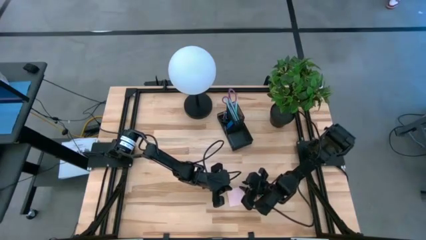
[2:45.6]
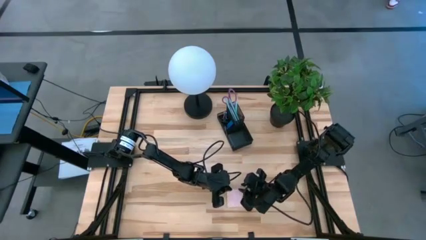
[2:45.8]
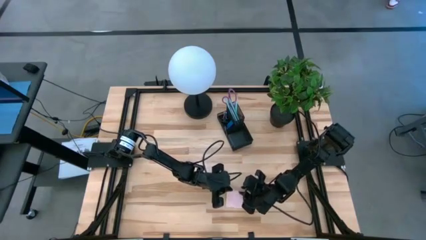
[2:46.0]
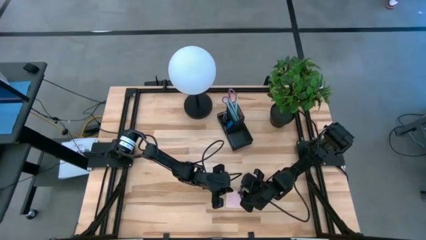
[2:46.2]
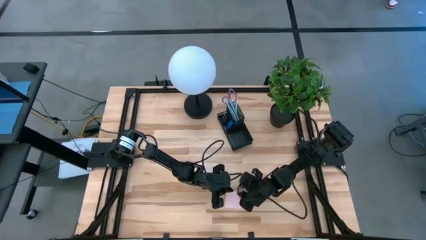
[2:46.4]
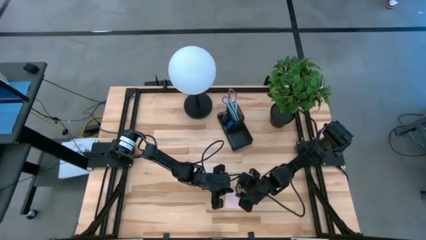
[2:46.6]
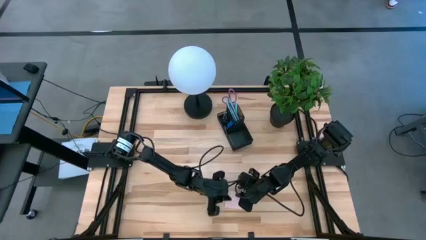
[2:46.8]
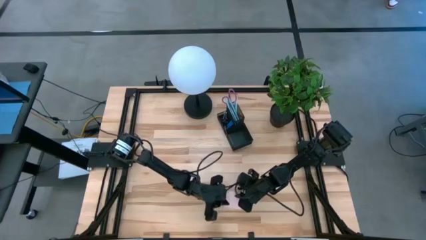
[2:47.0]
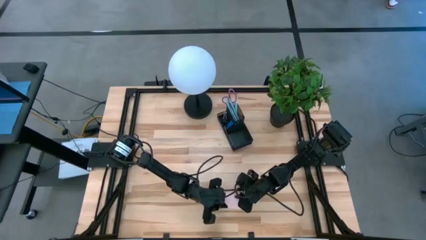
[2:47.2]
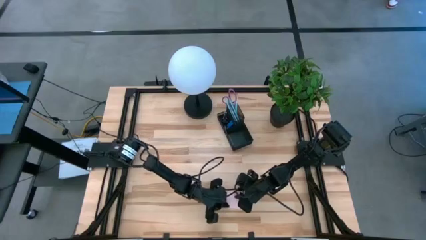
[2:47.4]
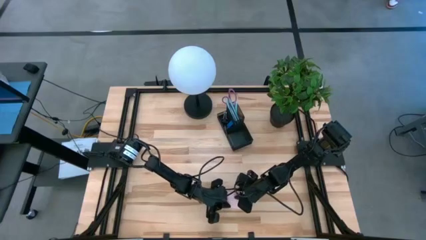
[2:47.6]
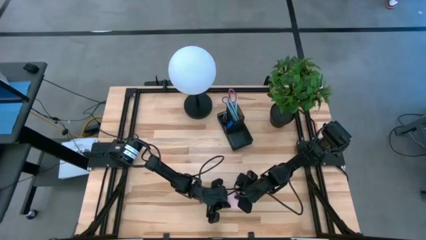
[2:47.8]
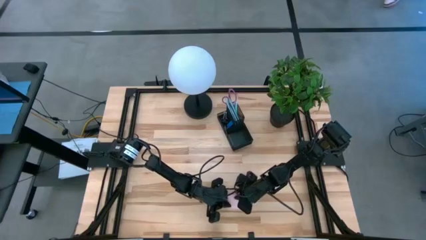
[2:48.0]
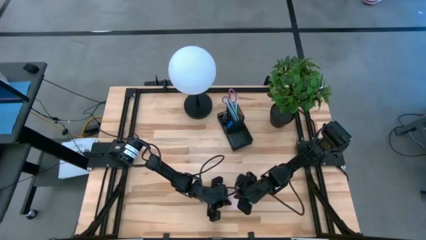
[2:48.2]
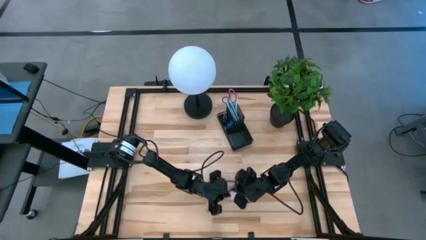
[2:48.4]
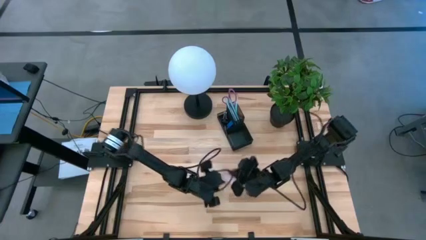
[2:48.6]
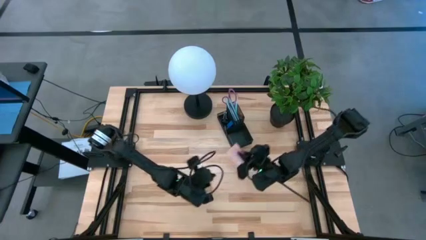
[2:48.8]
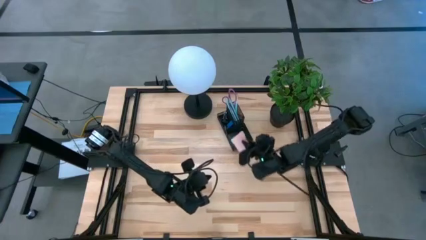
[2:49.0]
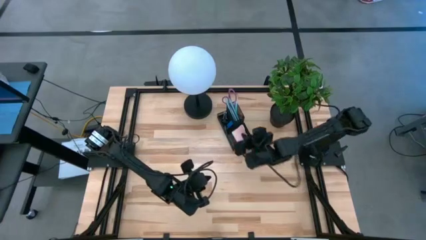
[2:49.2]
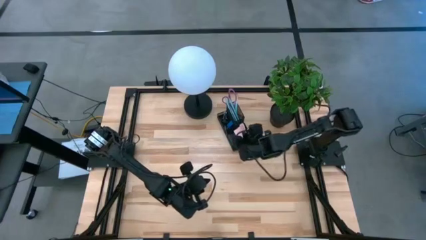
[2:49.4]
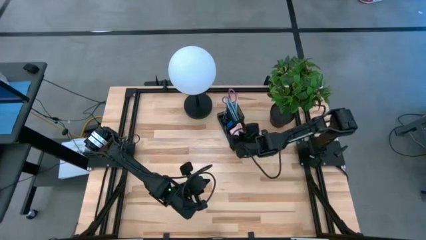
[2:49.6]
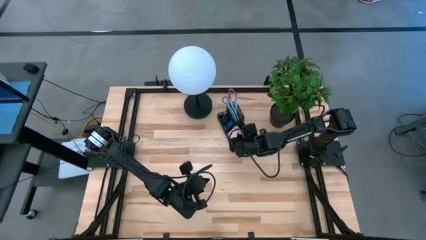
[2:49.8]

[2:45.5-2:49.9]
Task: Pick and place office supplies into organizer
Put the pink sticky note into the desk organizer

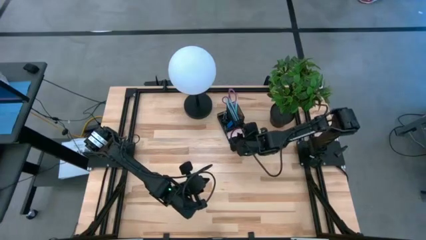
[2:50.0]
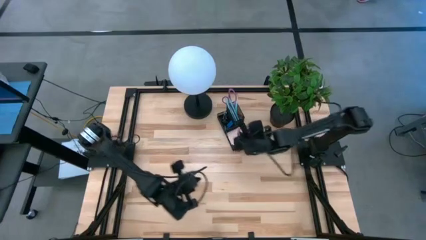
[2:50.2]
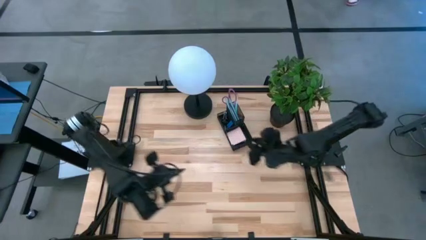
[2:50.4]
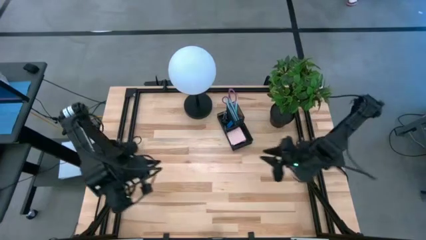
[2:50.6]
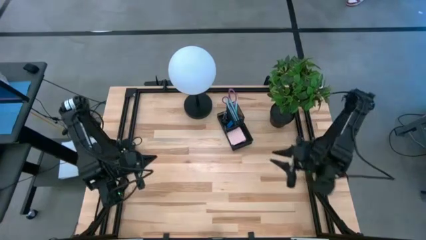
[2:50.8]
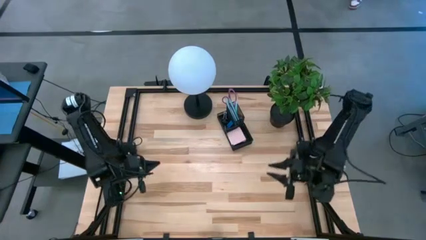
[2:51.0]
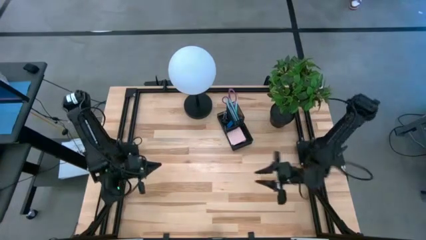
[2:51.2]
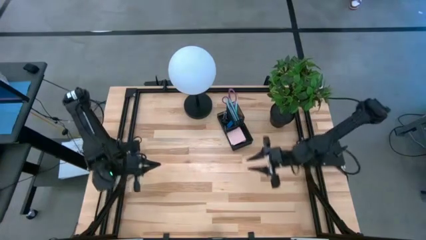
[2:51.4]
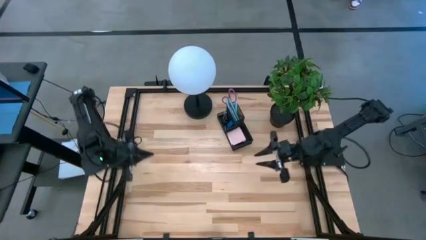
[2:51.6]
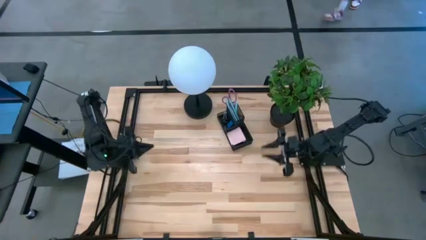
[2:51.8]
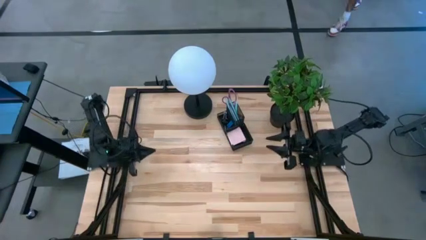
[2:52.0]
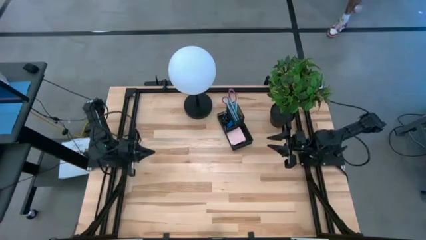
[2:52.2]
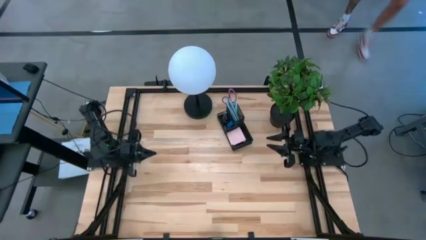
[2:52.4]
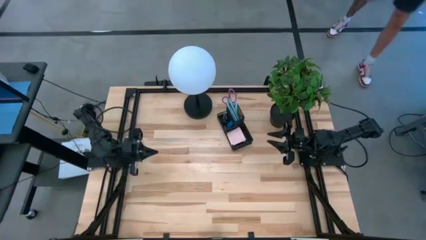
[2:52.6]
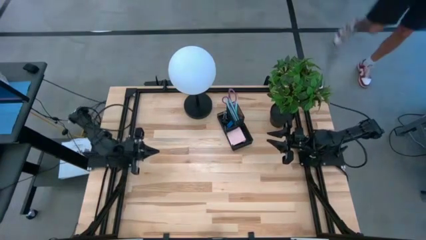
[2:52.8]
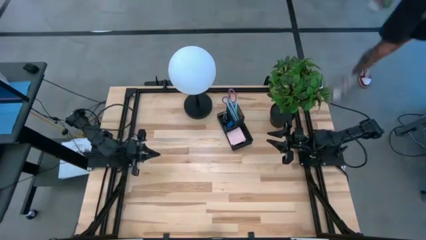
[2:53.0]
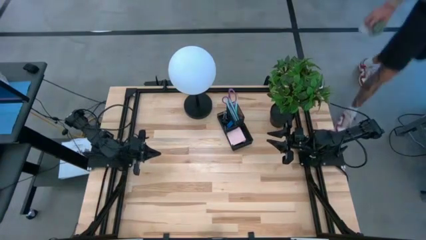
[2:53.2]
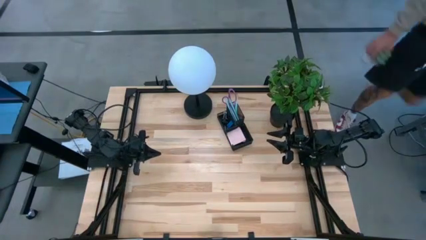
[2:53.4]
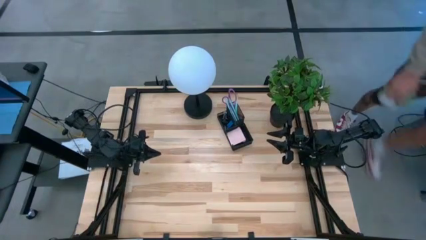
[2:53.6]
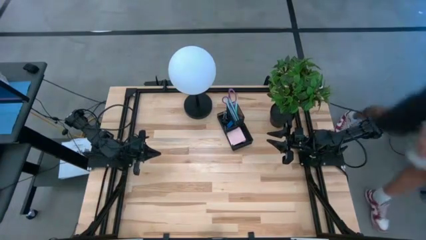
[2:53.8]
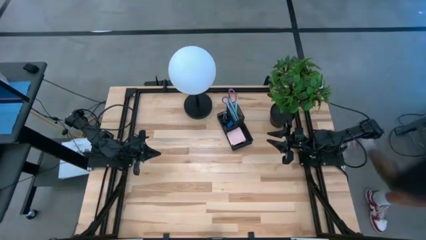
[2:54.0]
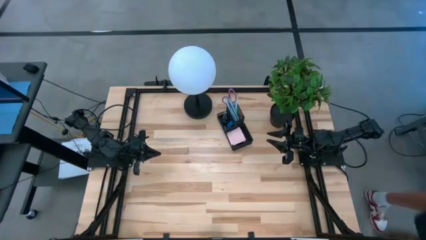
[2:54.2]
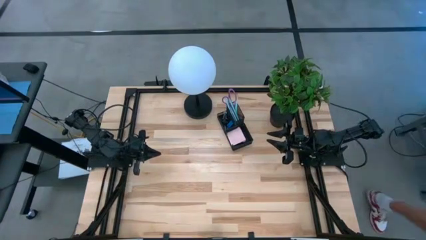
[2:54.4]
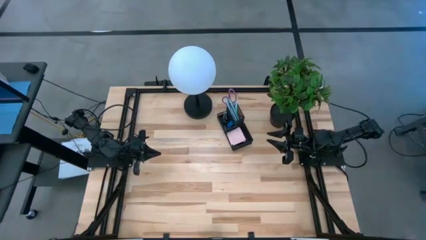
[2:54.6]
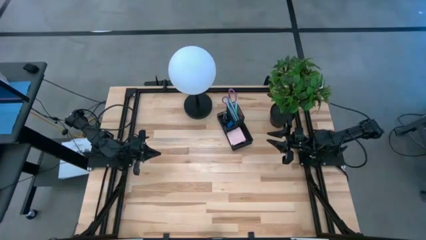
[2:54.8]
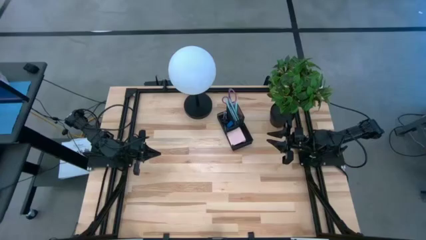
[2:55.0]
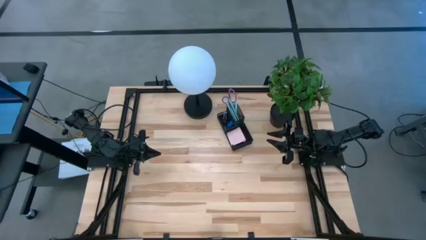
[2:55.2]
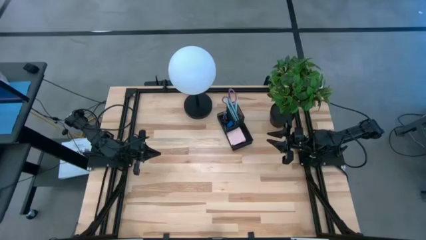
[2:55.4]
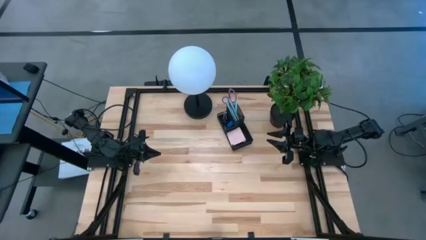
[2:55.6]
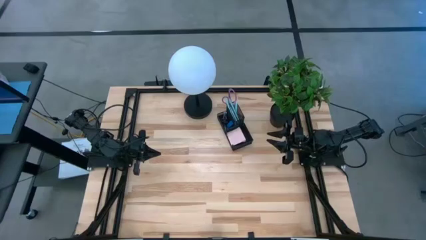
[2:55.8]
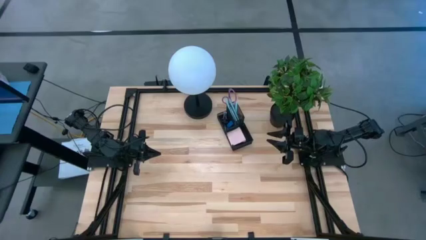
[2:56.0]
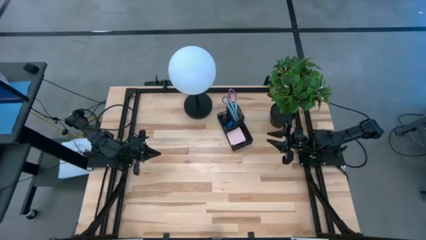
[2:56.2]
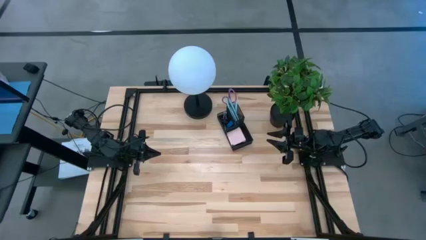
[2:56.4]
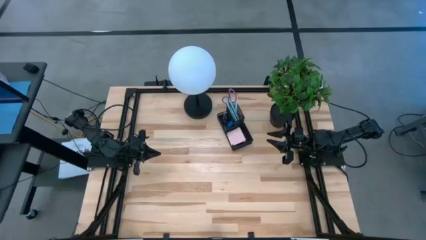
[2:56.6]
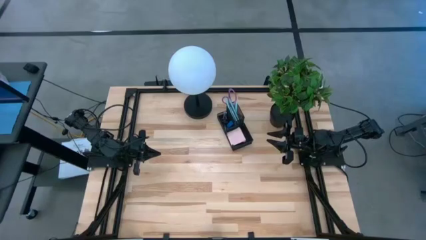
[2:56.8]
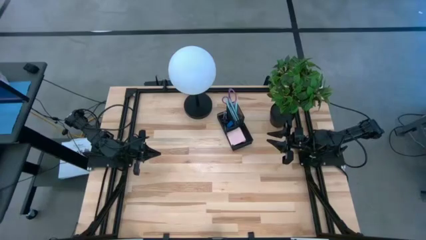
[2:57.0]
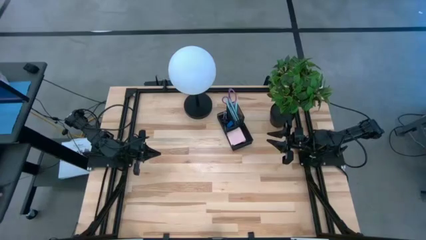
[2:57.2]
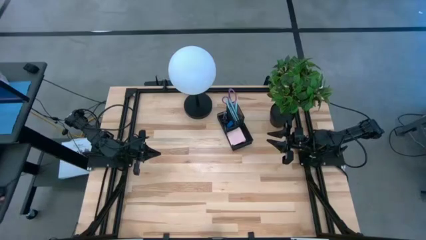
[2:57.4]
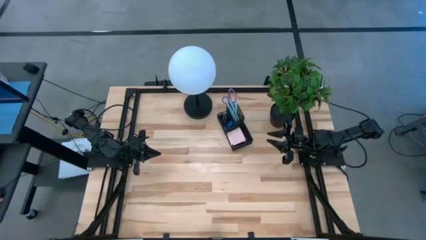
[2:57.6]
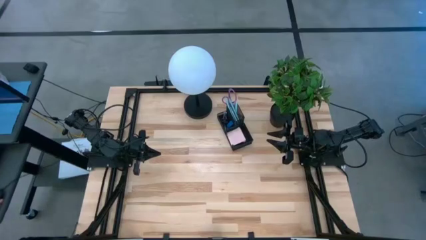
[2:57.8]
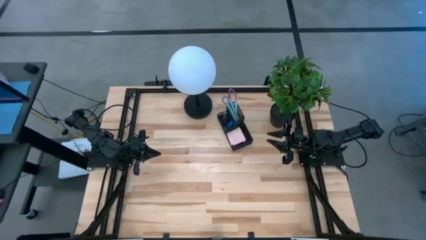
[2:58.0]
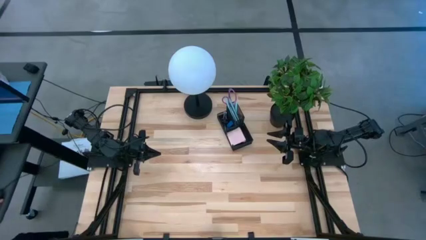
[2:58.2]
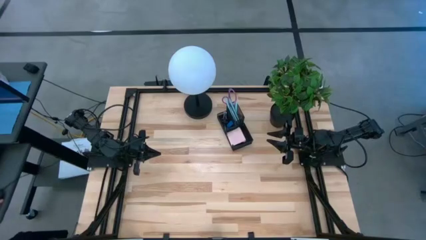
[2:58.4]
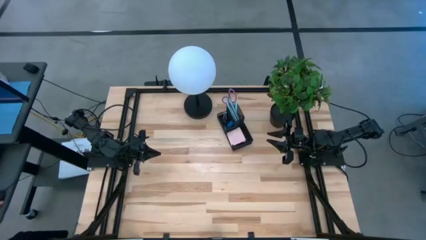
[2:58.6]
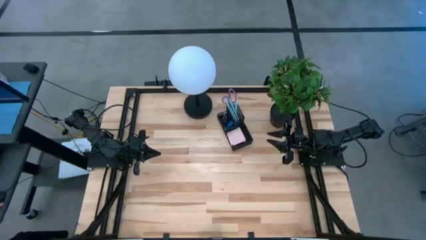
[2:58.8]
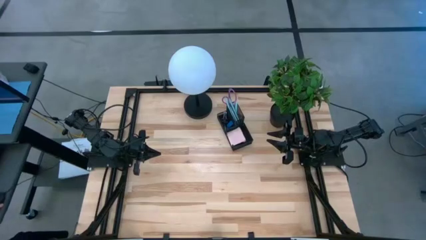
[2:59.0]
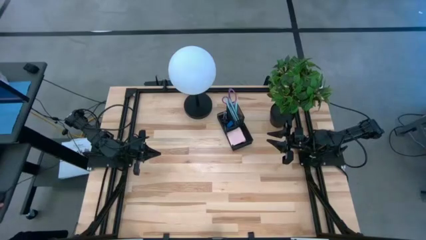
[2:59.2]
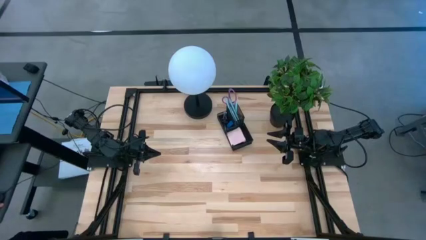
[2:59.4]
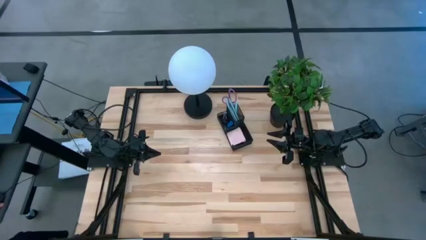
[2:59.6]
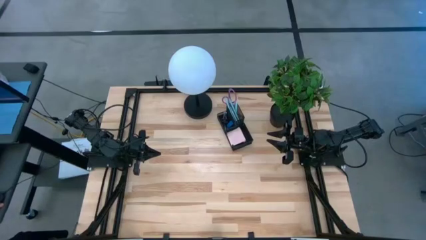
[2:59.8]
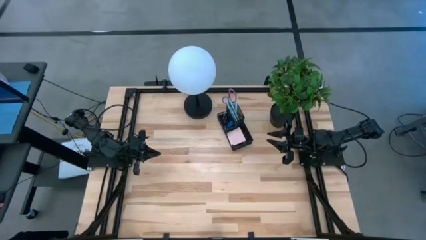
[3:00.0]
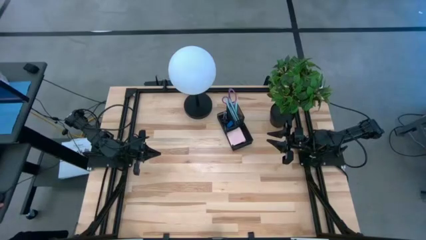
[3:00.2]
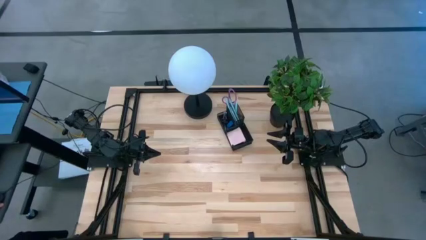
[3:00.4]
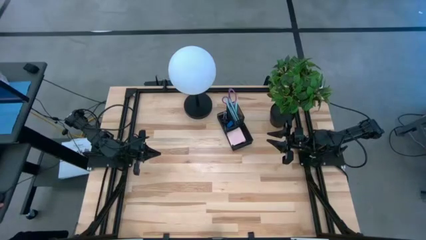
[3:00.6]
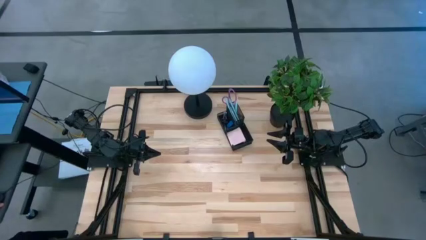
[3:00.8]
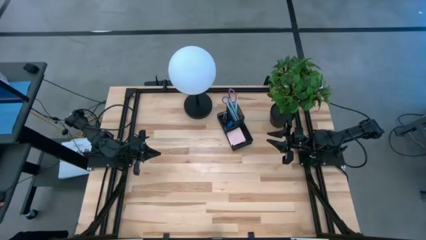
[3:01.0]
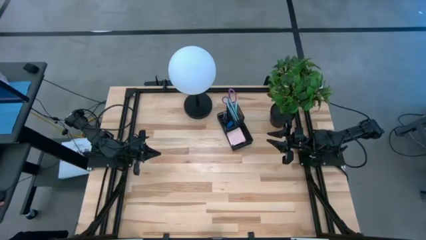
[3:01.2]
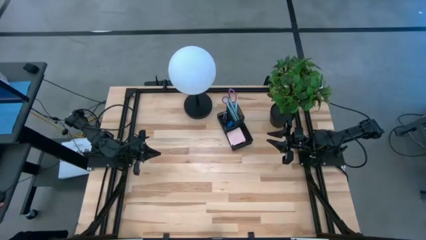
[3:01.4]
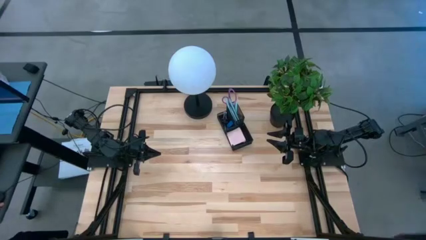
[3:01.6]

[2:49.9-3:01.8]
Return to Home Position
